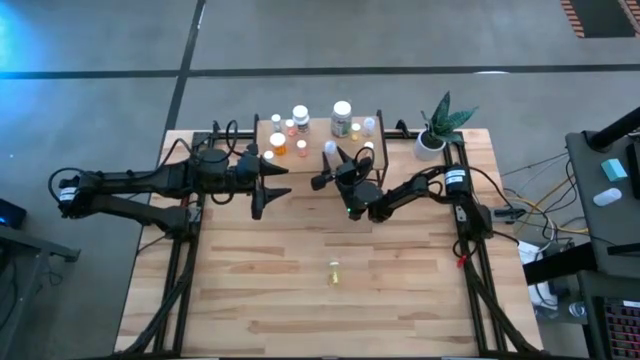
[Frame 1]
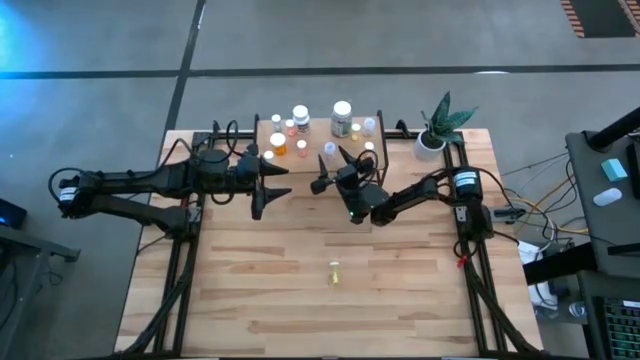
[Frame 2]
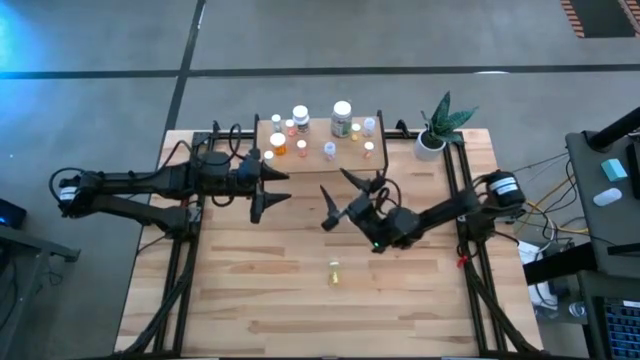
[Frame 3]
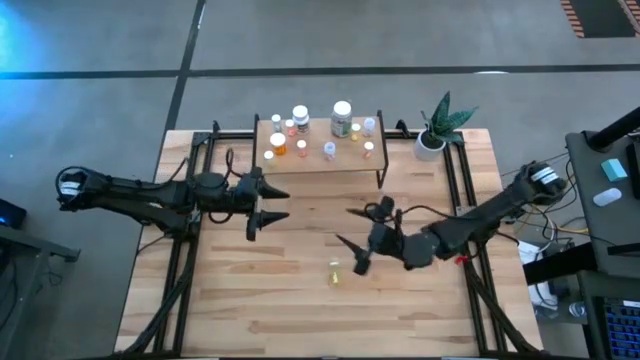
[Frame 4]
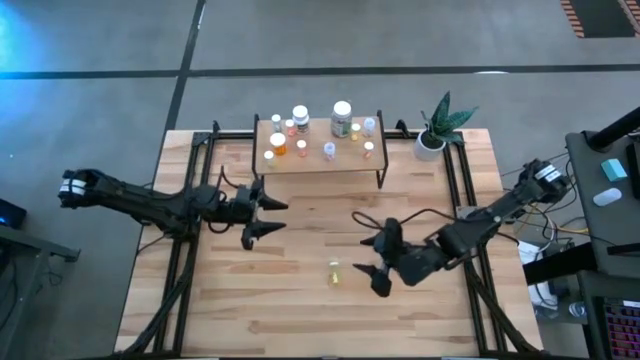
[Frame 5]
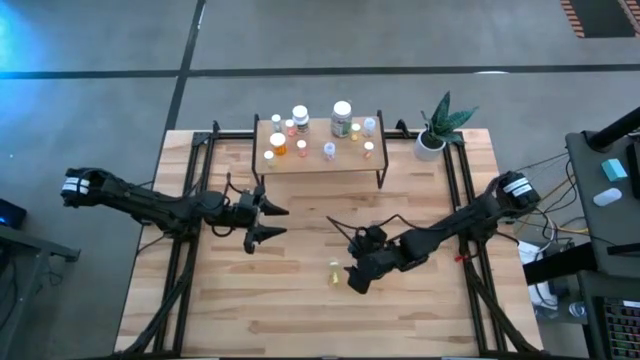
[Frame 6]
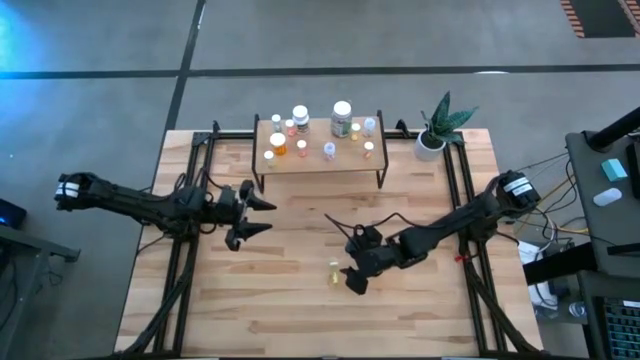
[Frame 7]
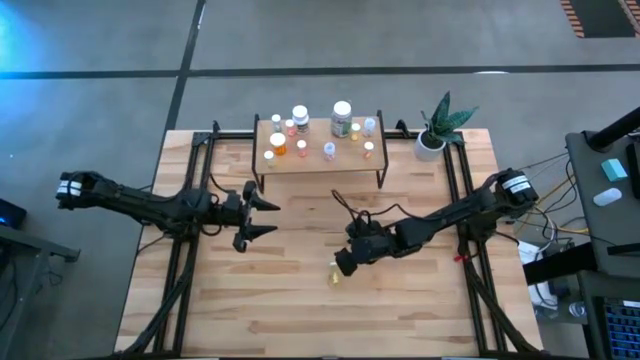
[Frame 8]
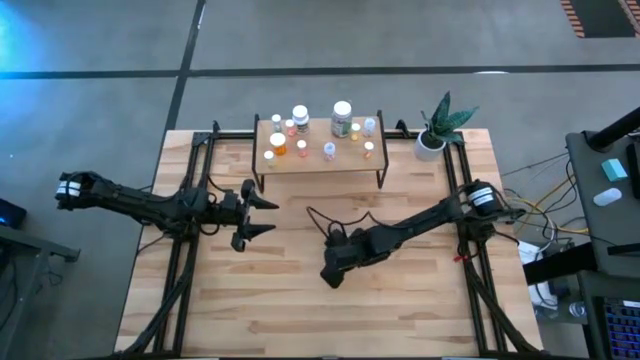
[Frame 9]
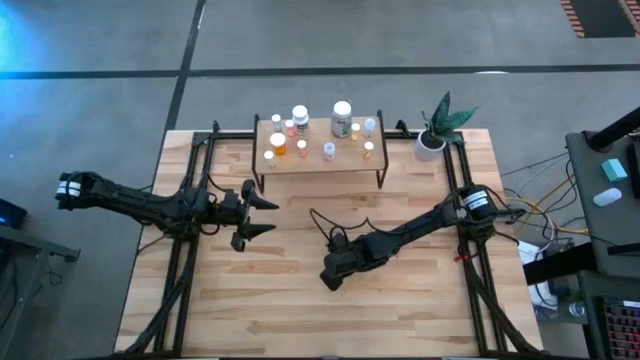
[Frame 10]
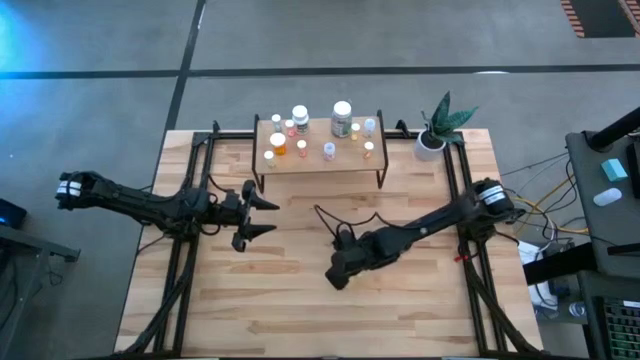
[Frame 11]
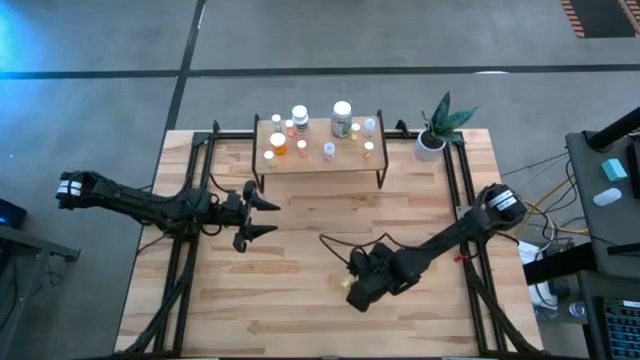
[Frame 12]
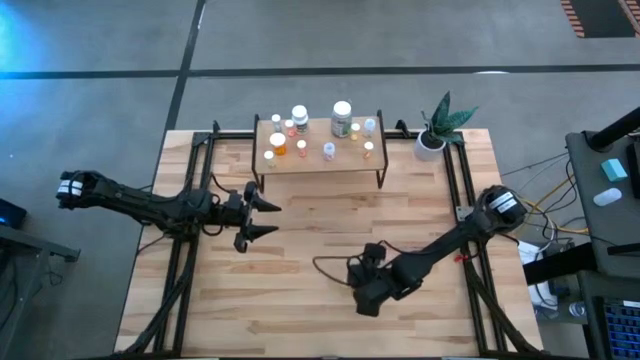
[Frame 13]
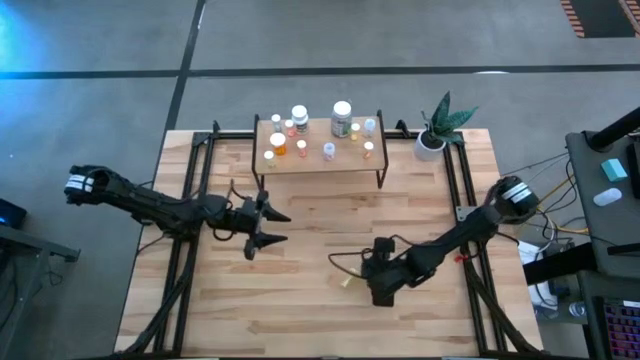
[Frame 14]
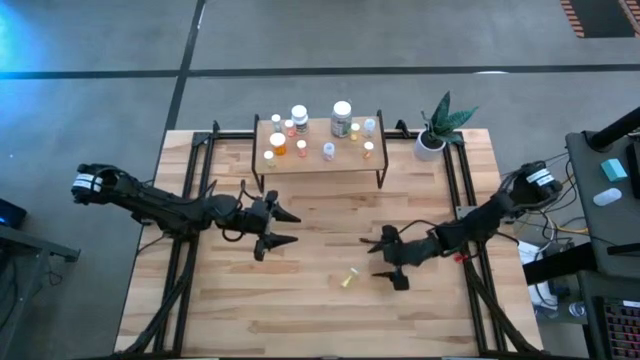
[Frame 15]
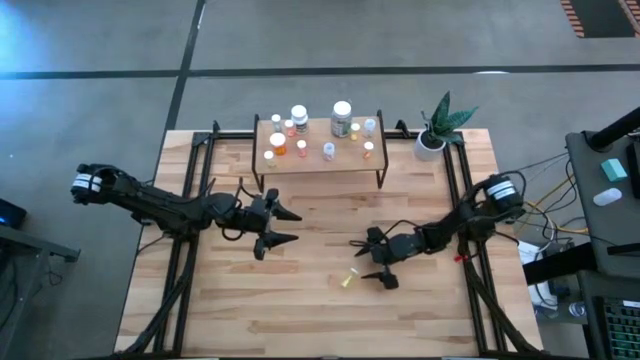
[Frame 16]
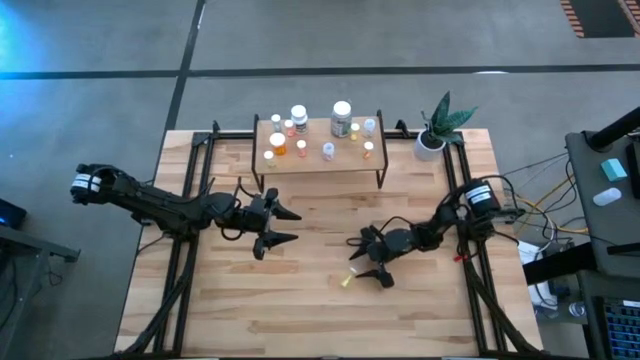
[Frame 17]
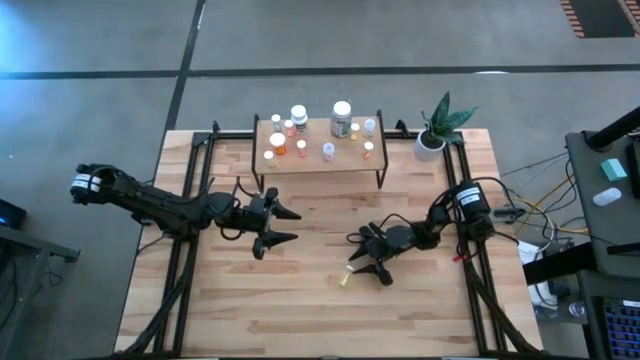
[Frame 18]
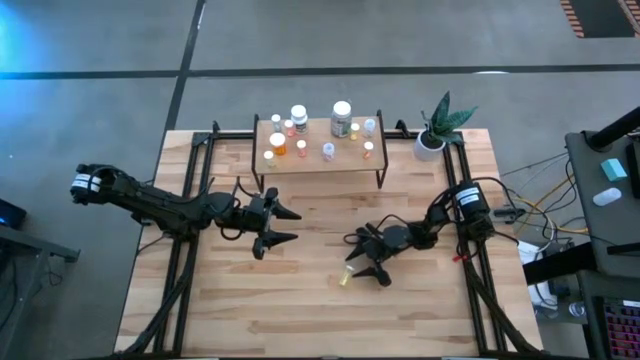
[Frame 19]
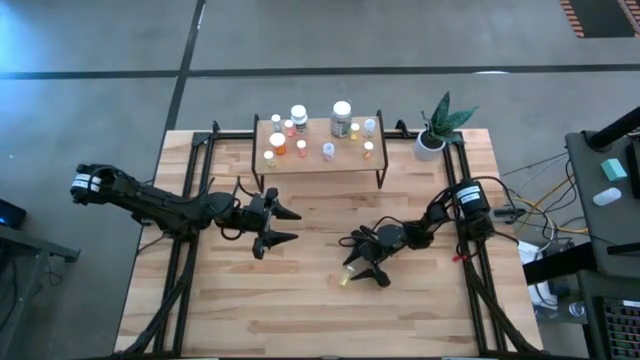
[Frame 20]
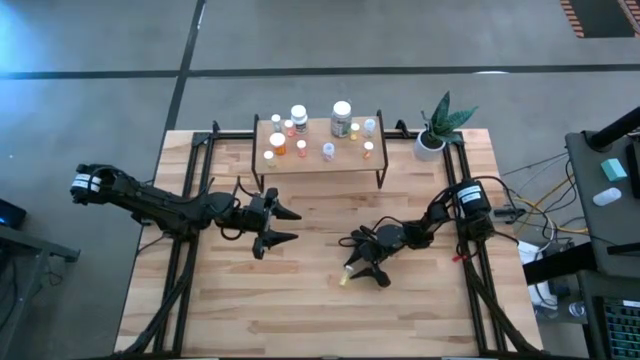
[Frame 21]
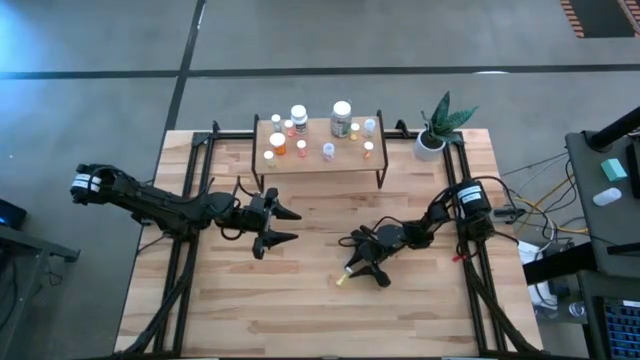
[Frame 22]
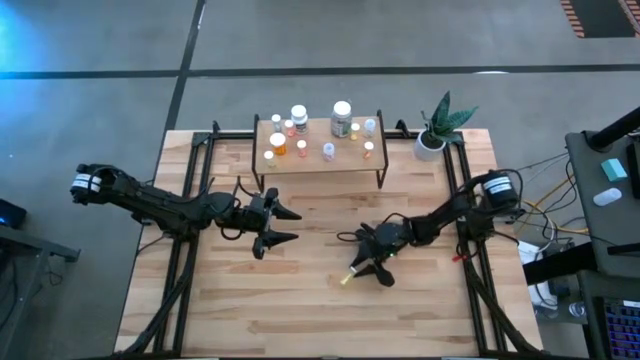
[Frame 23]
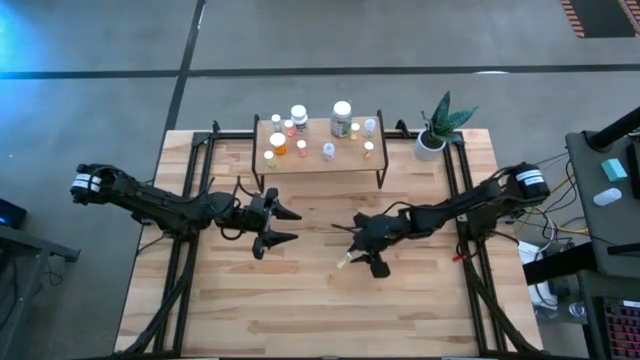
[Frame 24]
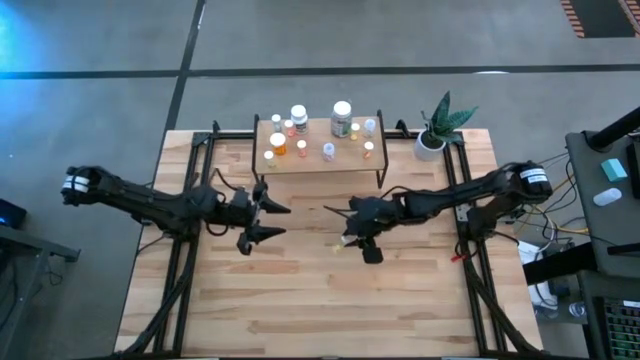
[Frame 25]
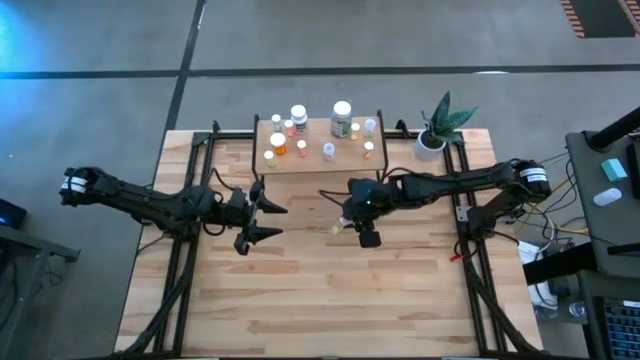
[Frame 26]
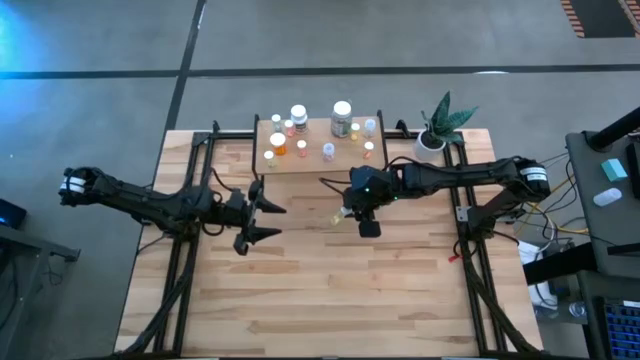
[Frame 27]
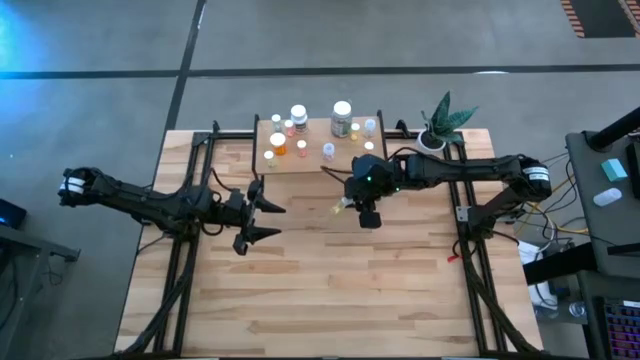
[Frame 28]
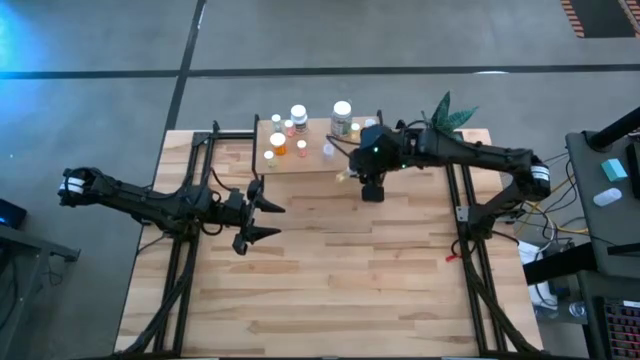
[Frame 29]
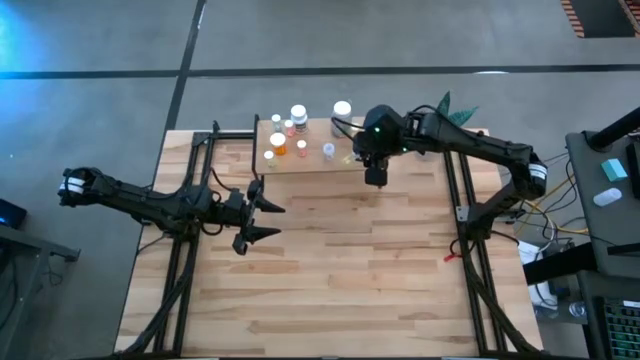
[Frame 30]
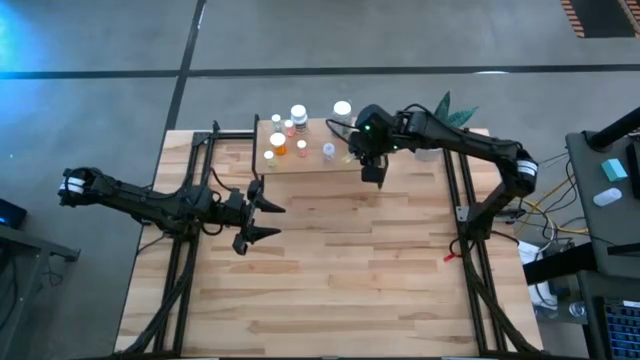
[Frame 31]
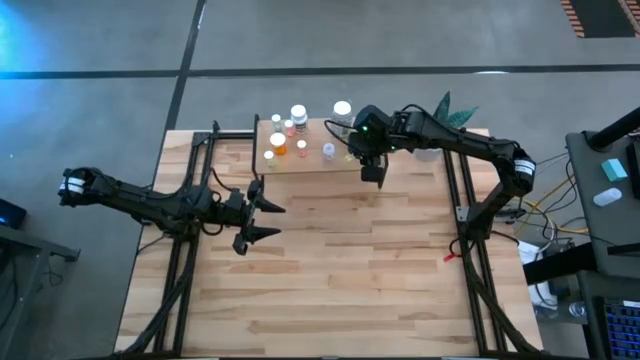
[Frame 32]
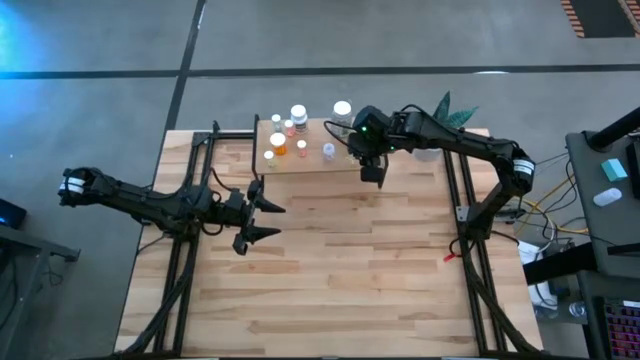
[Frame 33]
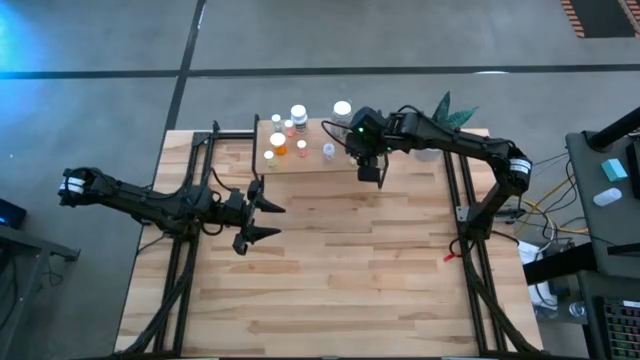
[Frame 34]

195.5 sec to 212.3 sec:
Task: Pick and place medicine bottles onto shelf by color
Put the yellow medicine bottle on the shelf

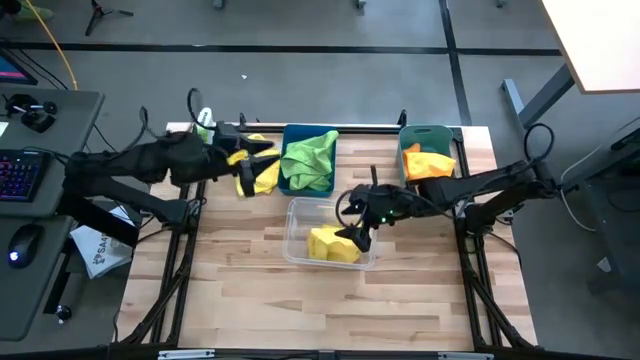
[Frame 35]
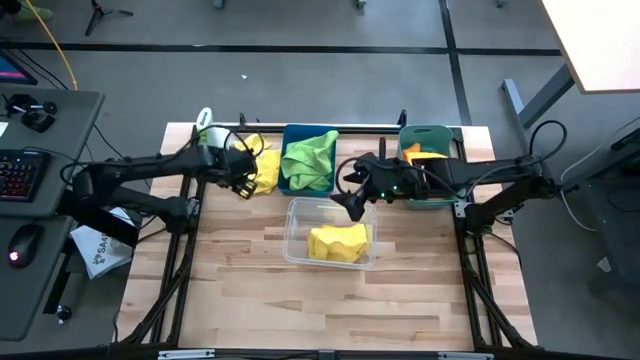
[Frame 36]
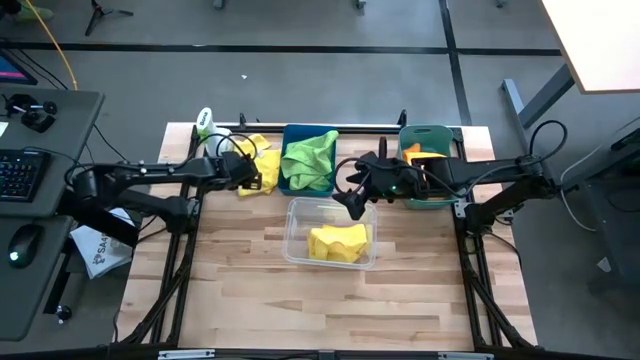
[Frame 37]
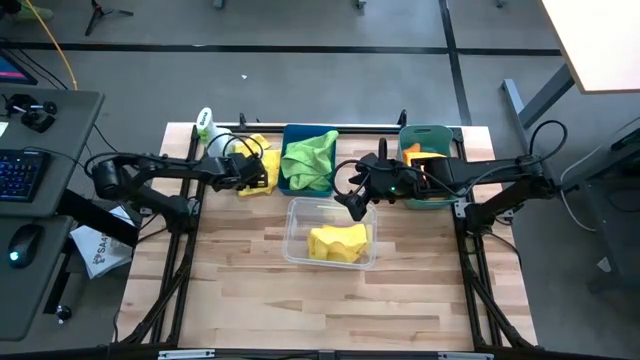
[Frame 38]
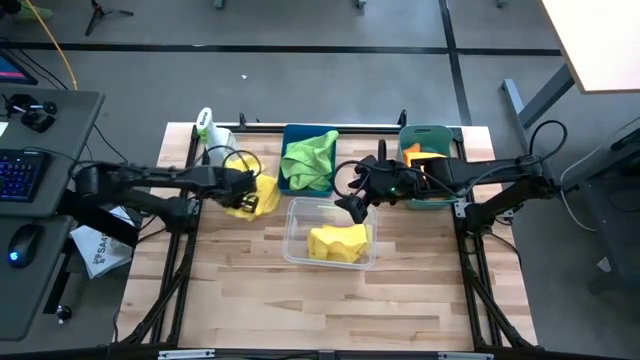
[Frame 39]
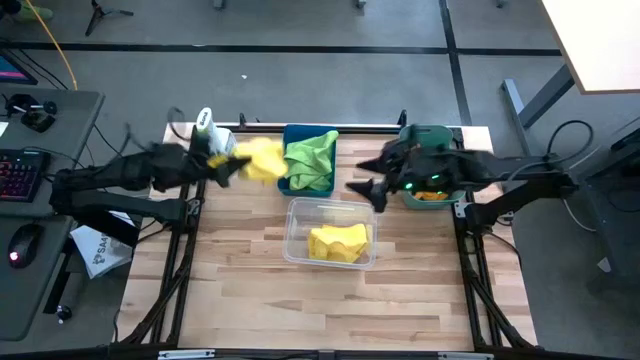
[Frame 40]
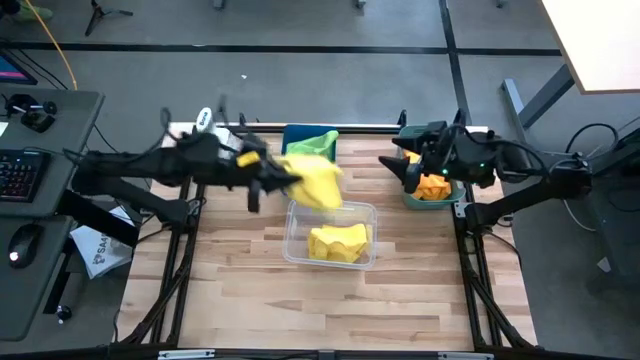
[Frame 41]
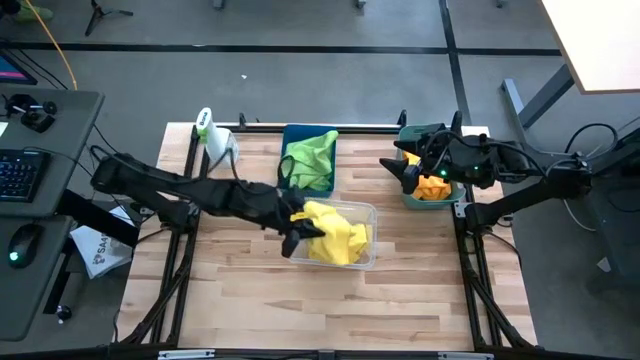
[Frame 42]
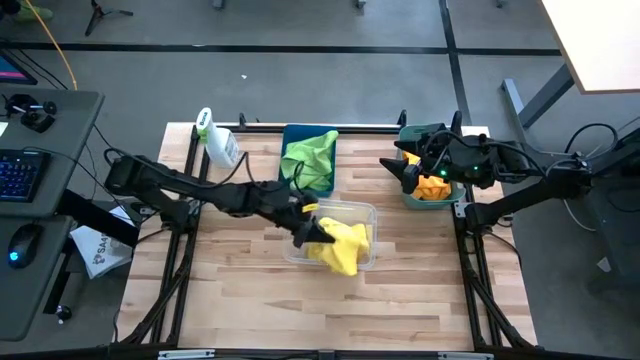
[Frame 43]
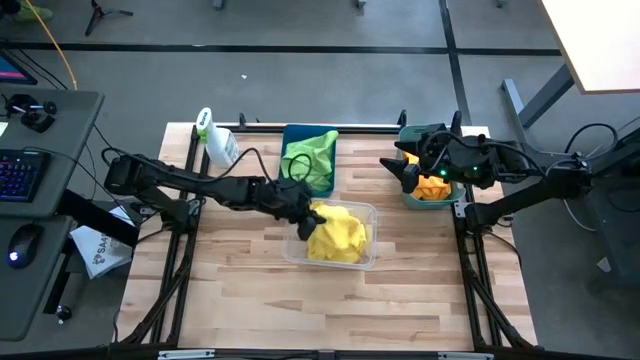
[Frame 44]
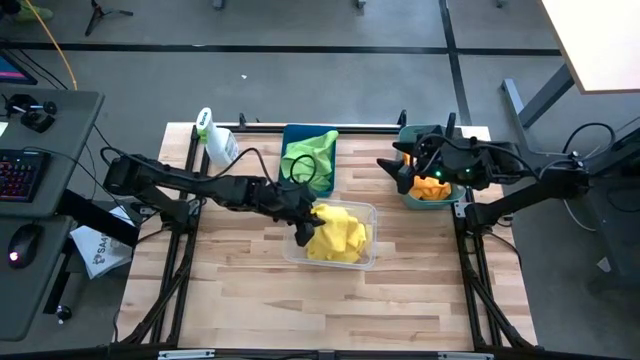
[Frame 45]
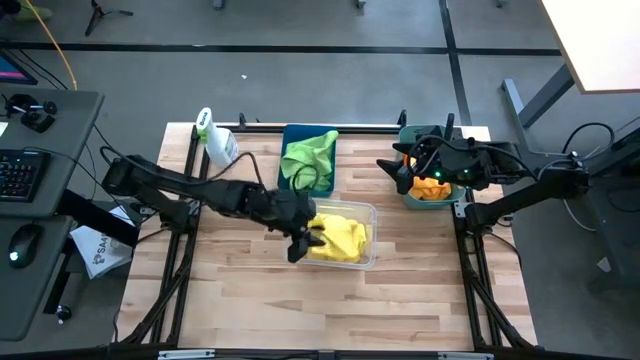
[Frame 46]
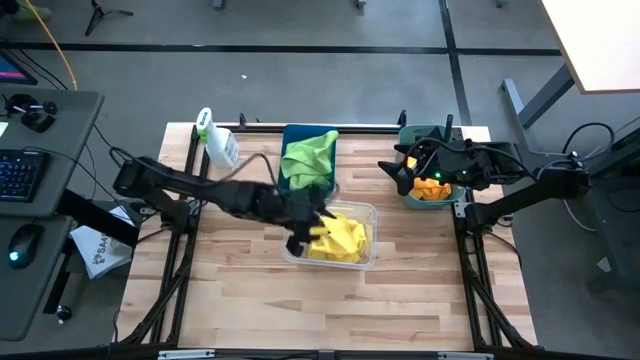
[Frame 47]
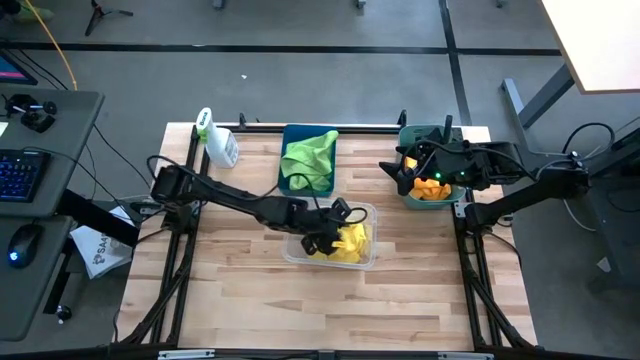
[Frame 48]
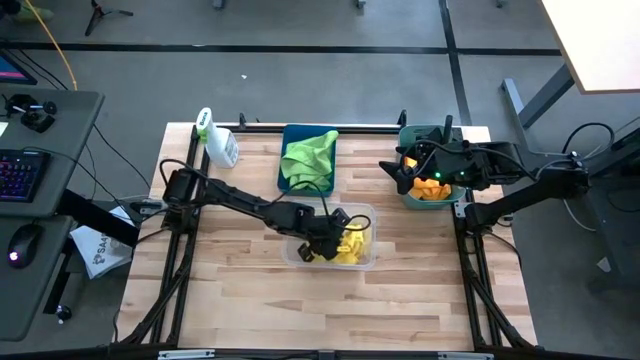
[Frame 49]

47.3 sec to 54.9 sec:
Task: Sort microfiber towel by color & place in baskets
Put the yellow microfiber cloth into the transparent bin
